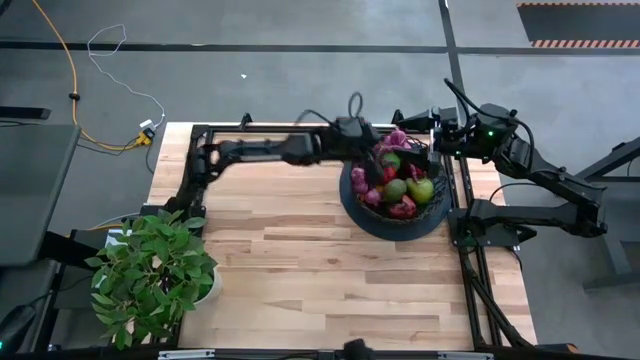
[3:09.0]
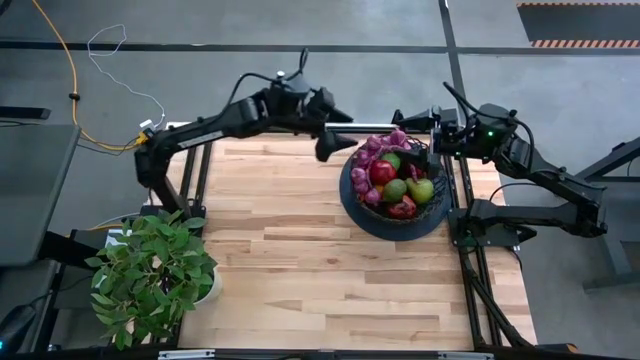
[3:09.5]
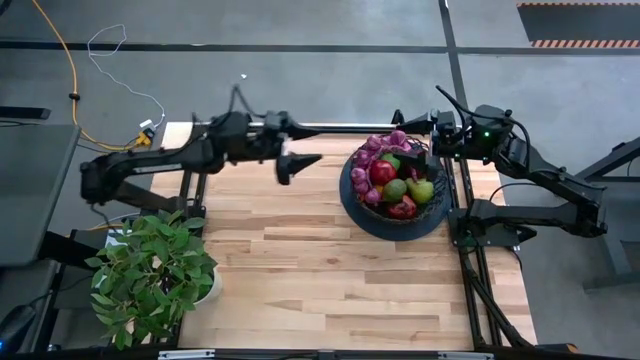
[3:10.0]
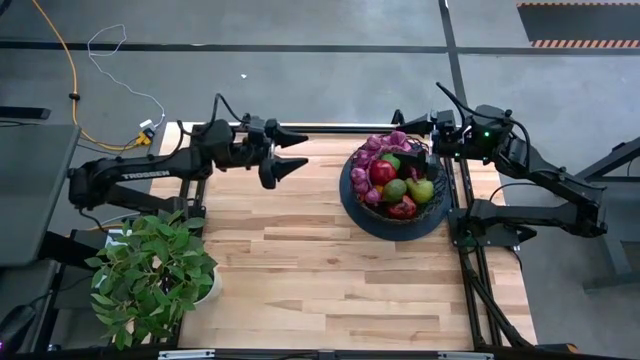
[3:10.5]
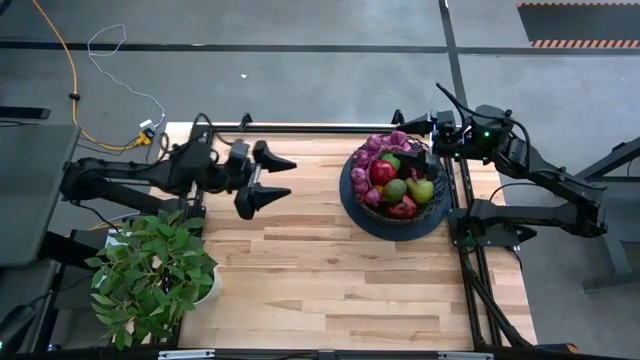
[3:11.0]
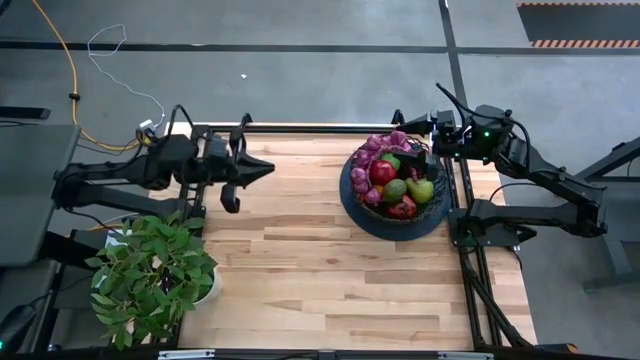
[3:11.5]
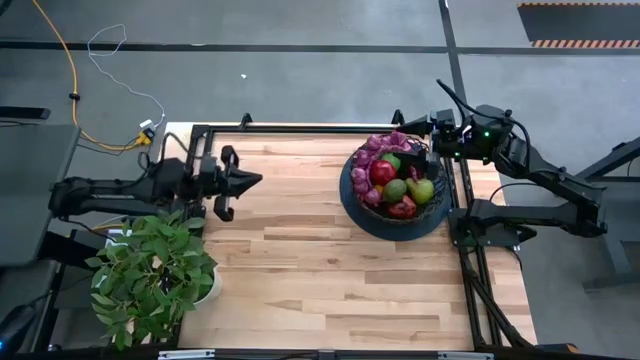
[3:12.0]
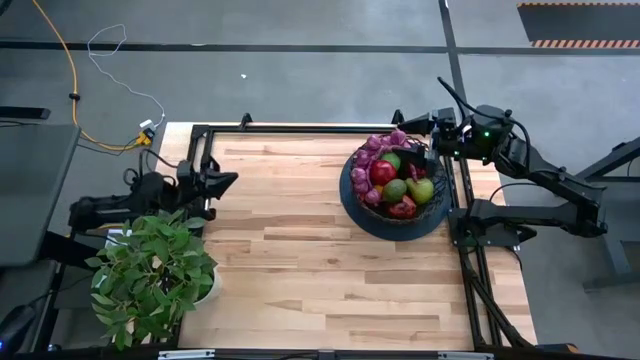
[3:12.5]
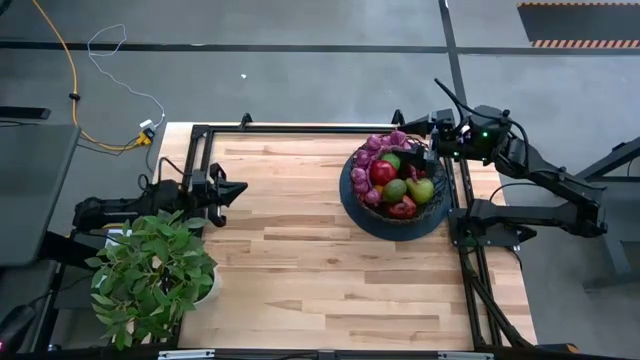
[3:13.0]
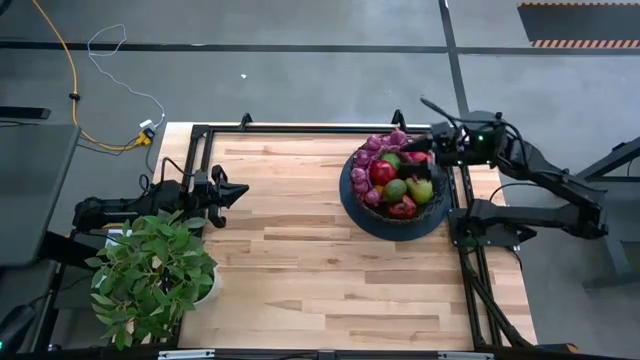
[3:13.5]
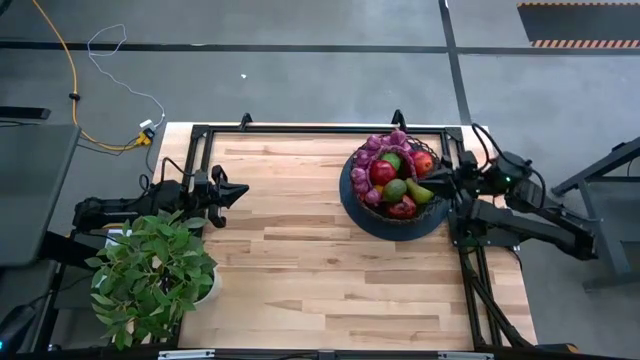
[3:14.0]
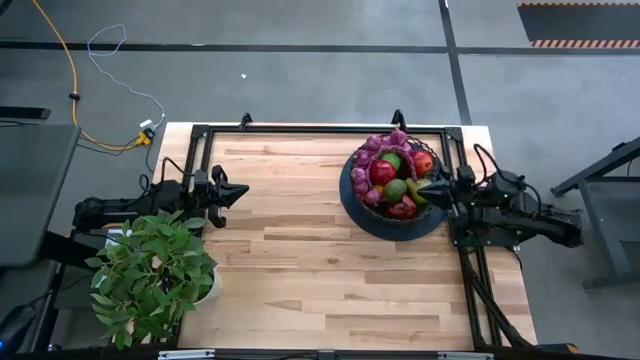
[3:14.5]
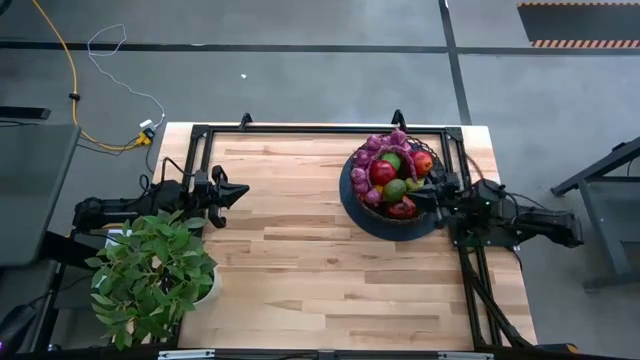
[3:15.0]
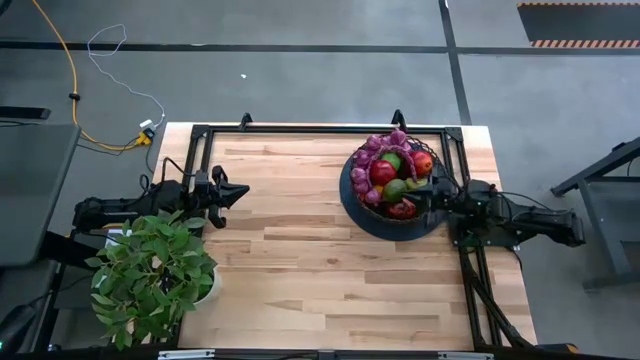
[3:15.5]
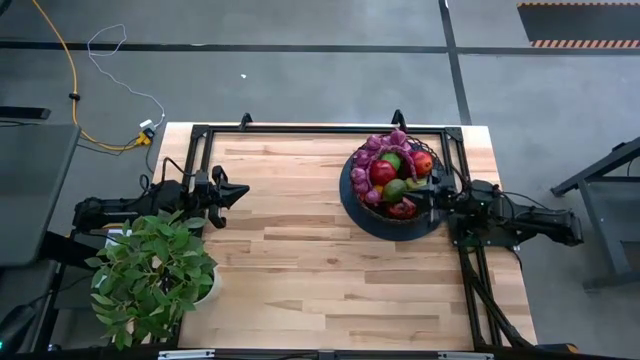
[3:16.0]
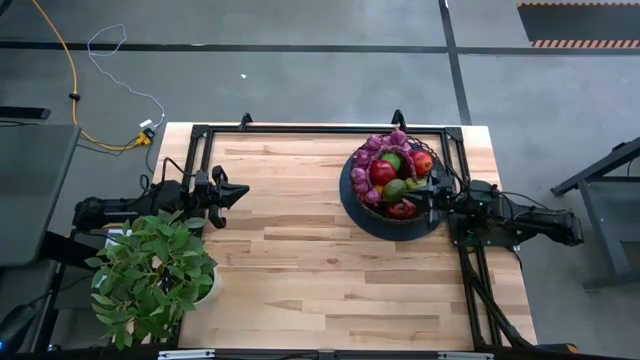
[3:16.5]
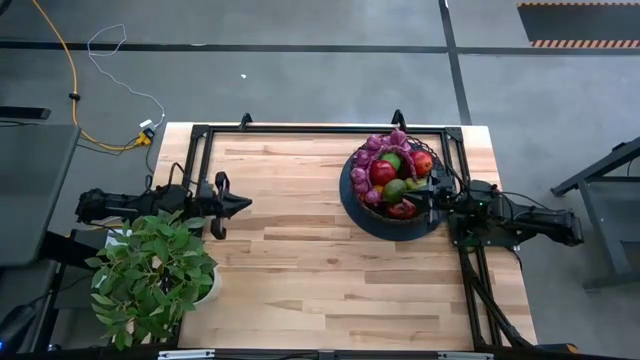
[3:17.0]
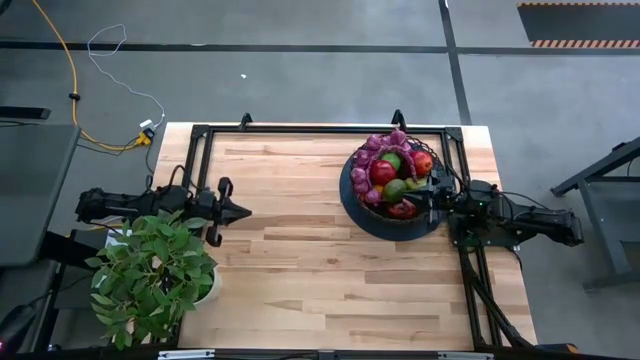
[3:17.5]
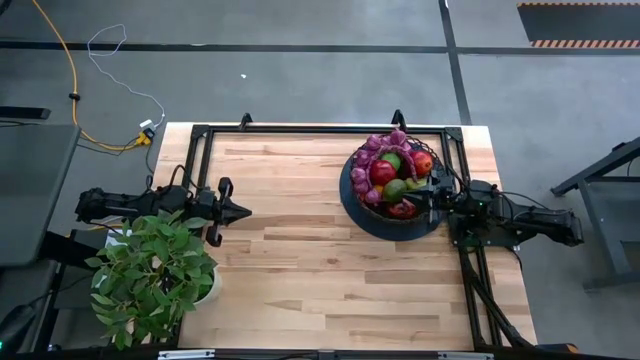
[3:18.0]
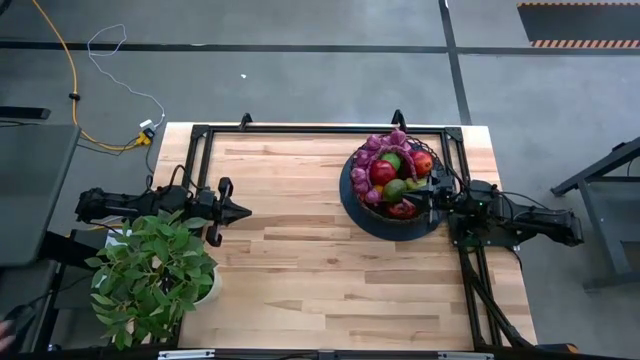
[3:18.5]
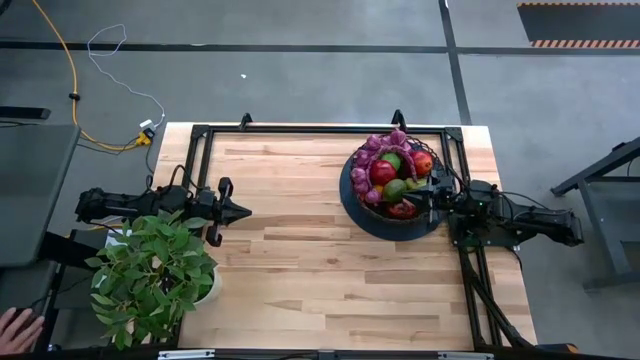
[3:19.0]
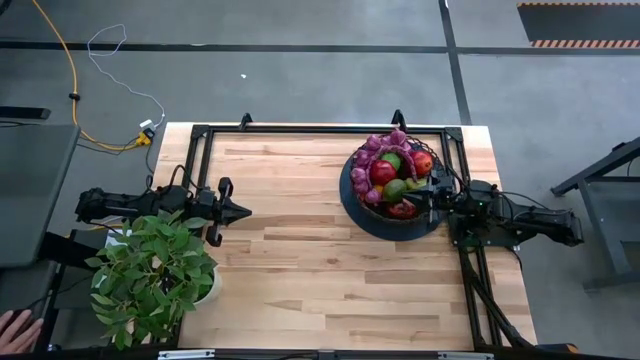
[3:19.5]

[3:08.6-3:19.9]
Task: Build produce basket
Return to Home Position

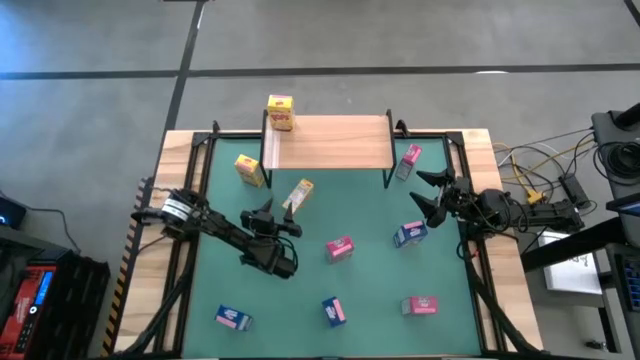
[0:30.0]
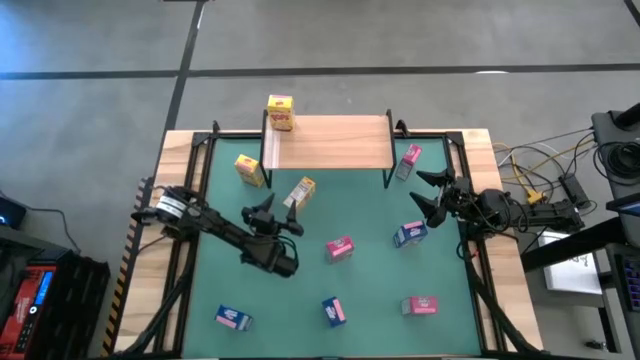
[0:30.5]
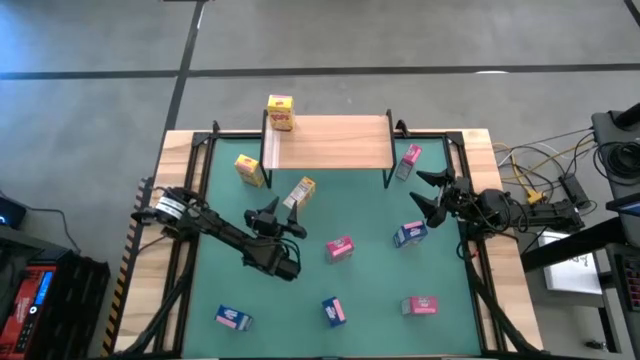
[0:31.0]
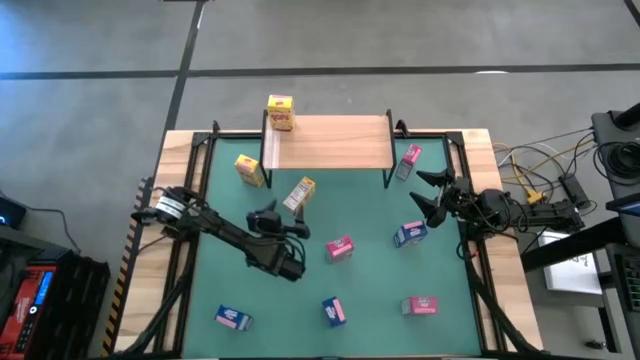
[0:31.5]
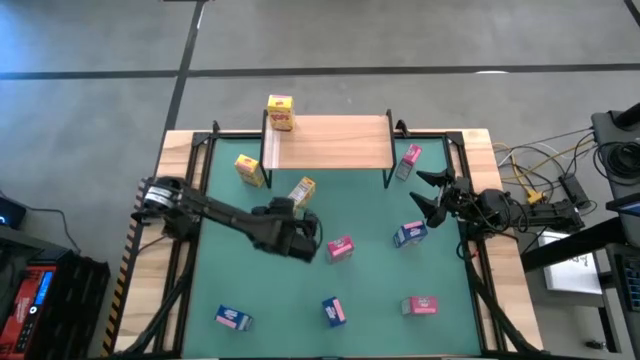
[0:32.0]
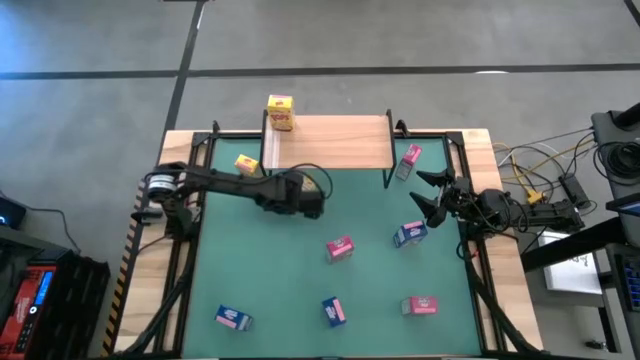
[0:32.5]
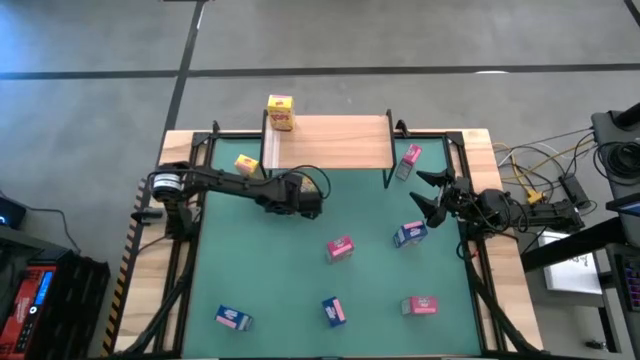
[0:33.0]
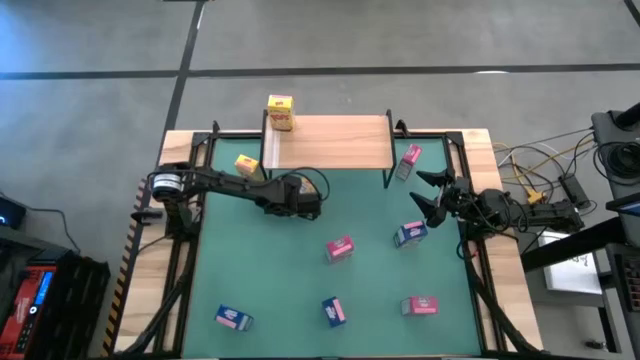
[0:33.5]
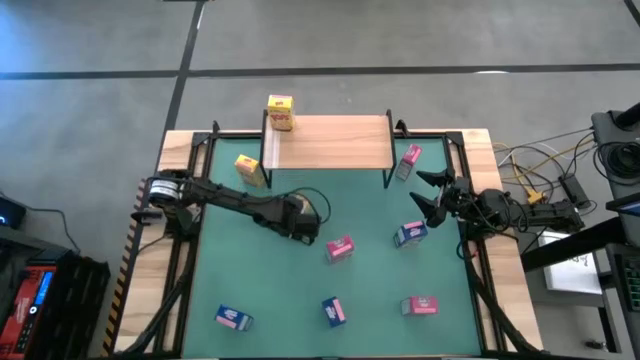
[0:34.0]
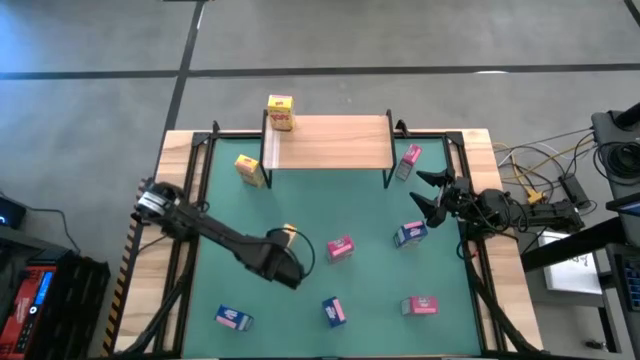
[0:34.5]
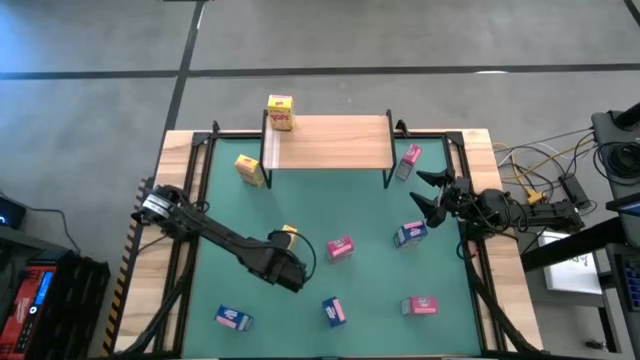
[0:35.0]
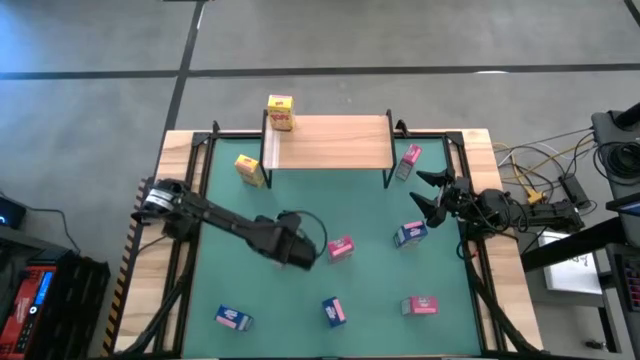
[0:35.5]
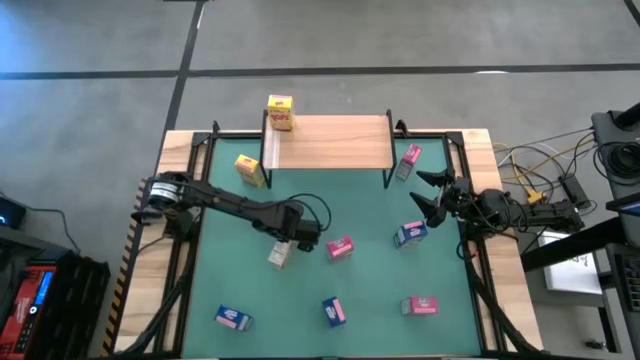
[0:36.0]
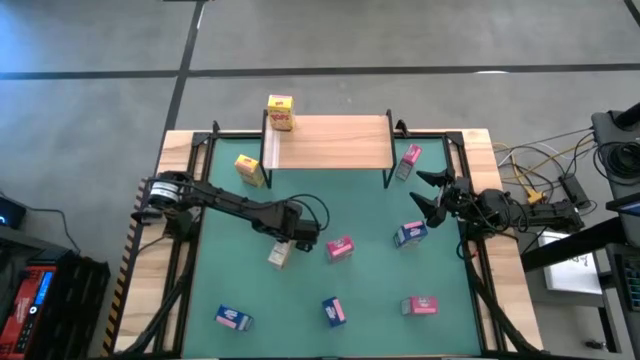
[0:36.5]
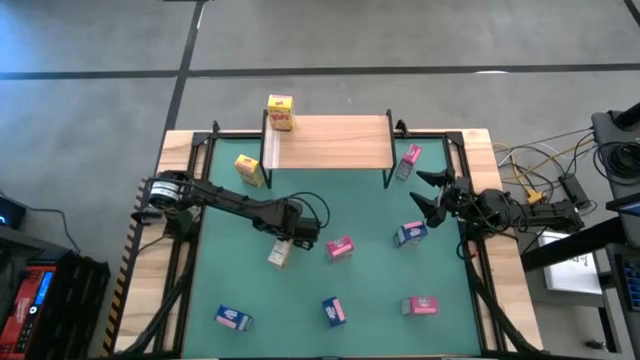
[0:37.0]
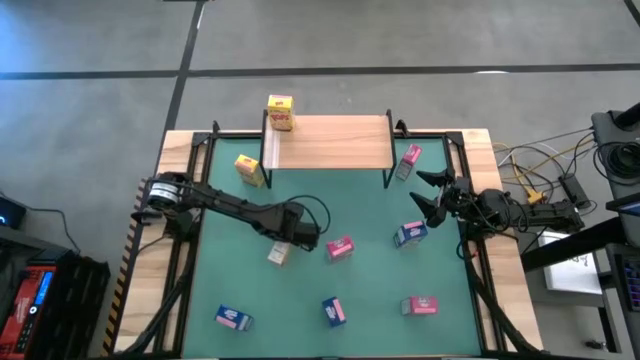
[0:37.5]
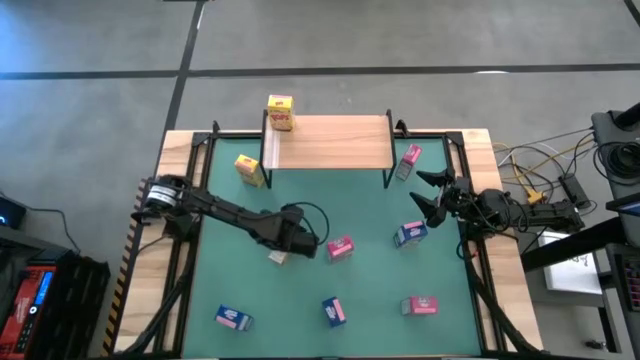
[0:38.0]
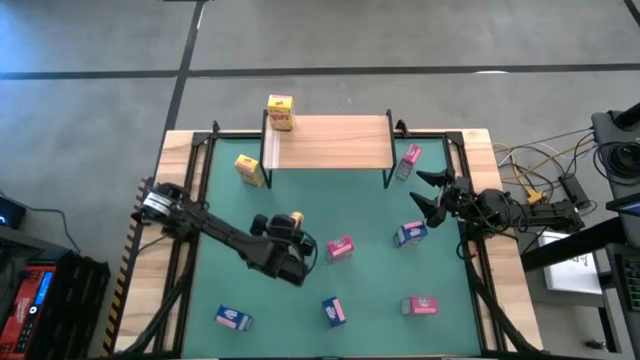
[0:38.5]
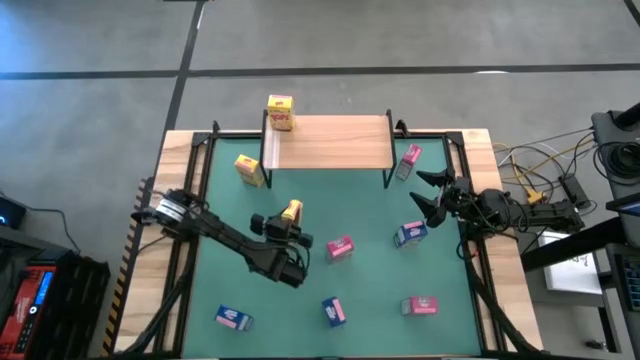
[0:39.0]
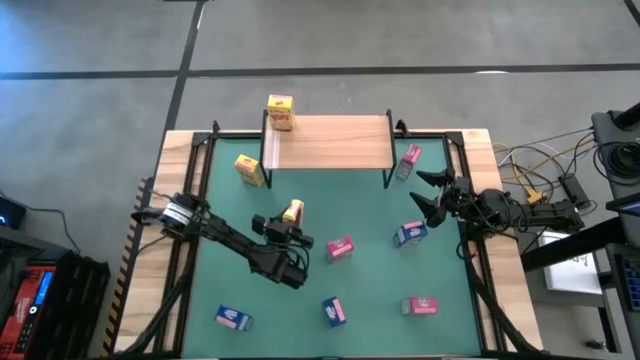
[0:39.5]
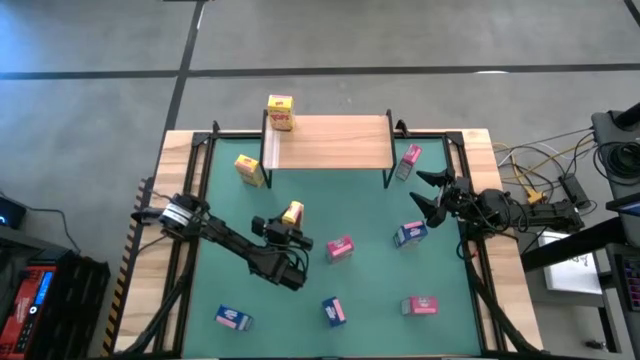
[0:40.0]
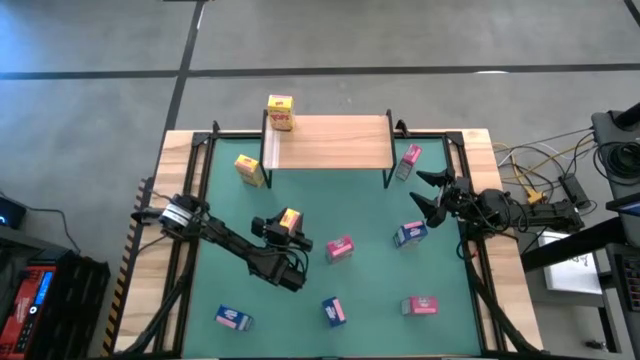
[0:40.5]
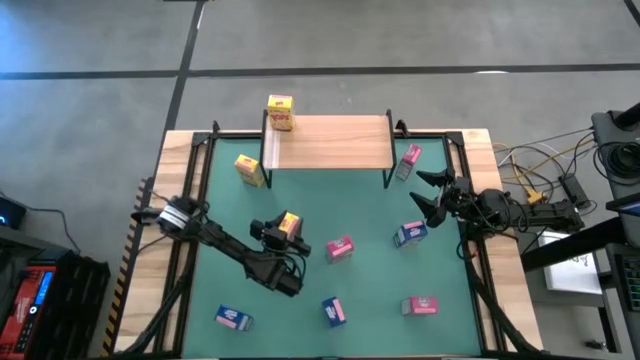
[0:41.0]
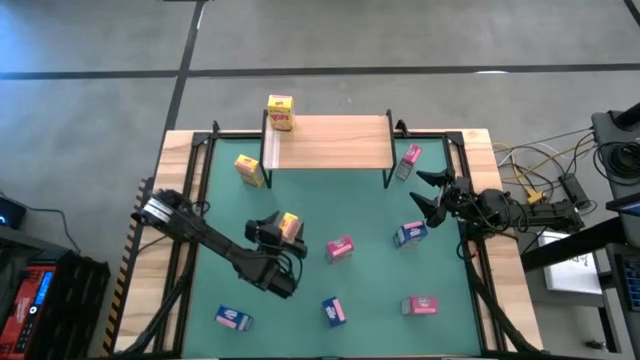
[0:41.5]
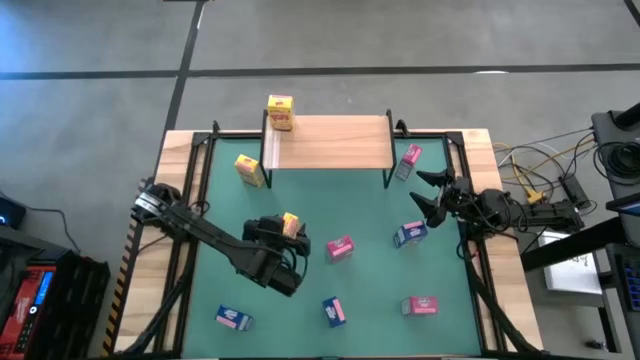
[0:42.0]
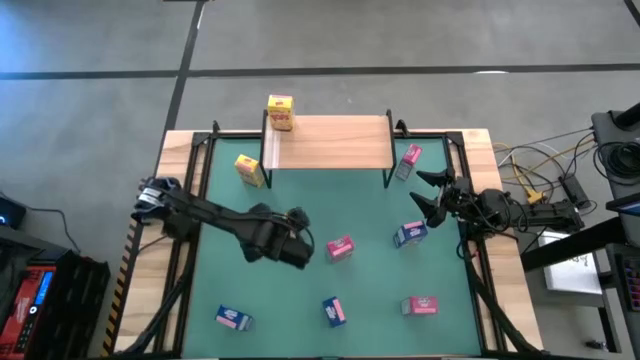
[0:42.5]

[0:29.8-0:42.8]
Task: Stack cereal on shelf
Put the bottom yellow cereal box on the shelf
